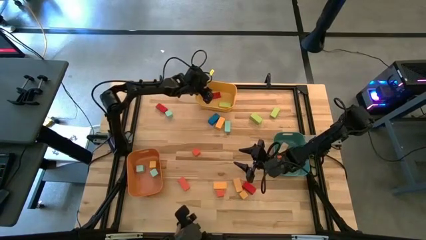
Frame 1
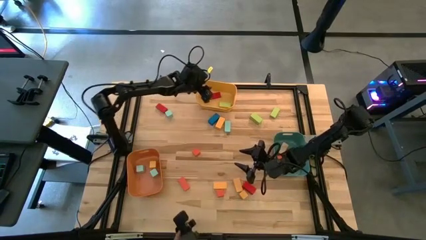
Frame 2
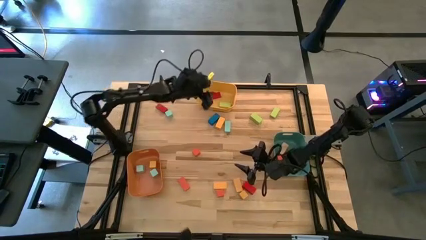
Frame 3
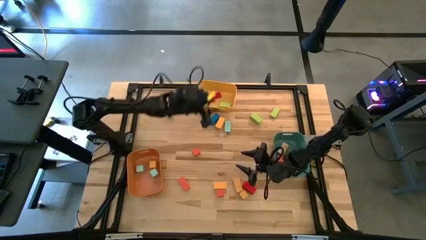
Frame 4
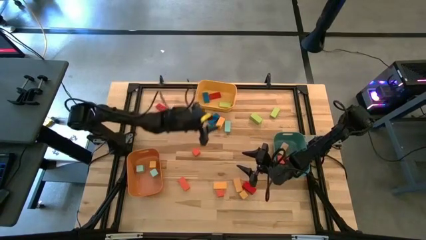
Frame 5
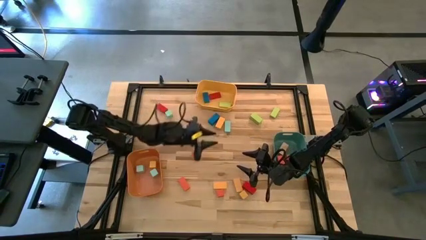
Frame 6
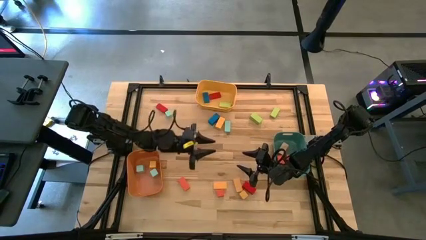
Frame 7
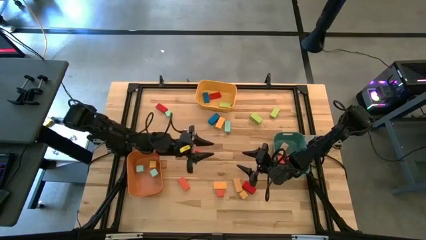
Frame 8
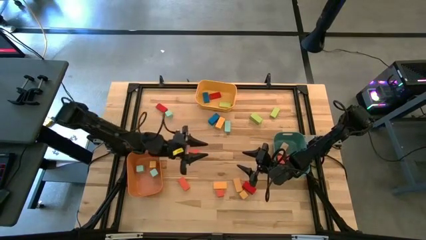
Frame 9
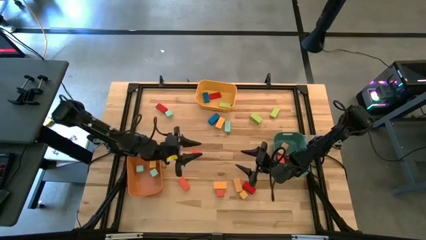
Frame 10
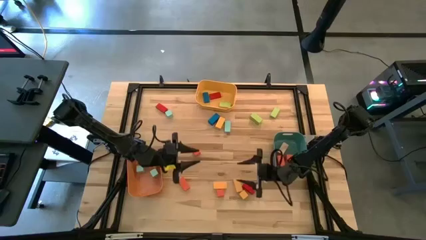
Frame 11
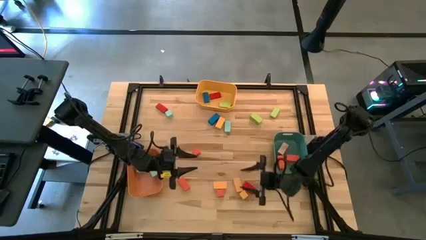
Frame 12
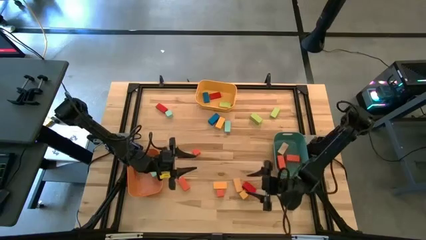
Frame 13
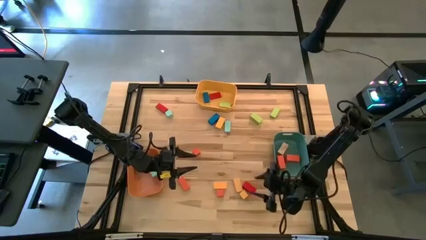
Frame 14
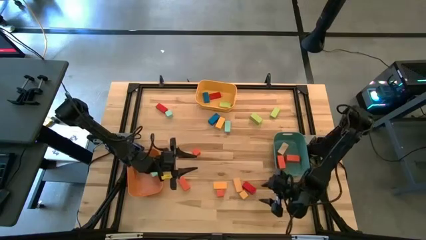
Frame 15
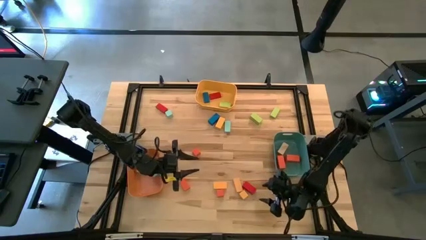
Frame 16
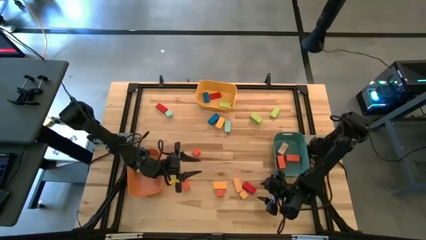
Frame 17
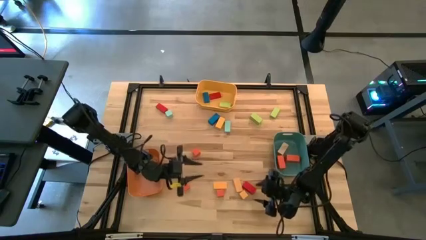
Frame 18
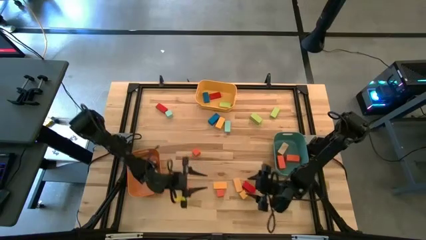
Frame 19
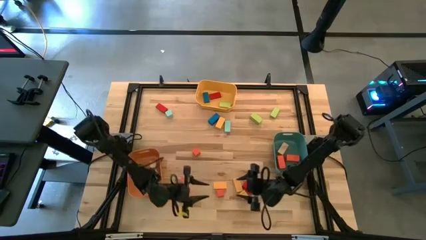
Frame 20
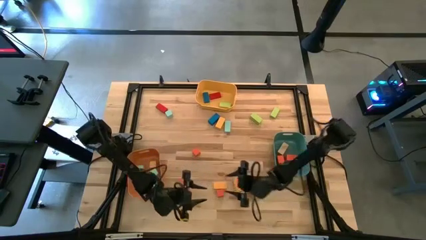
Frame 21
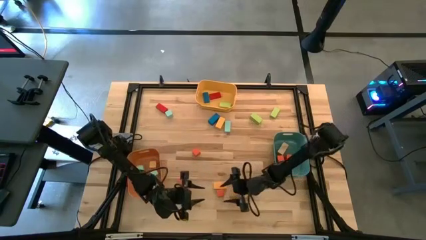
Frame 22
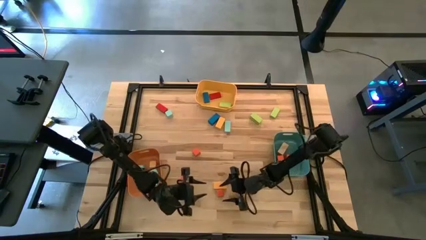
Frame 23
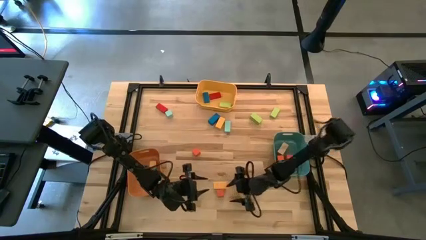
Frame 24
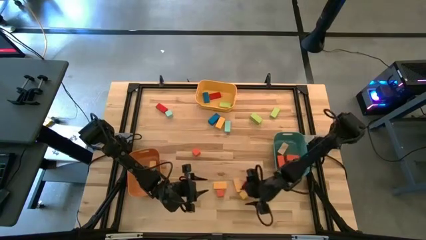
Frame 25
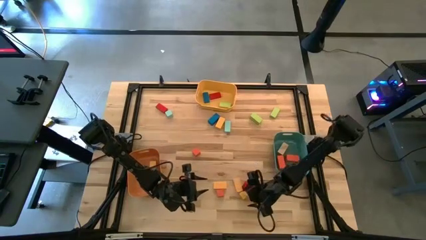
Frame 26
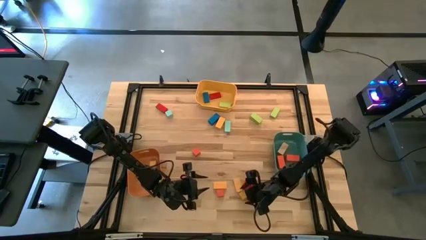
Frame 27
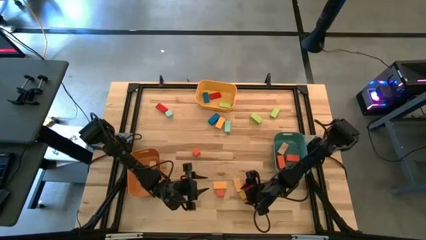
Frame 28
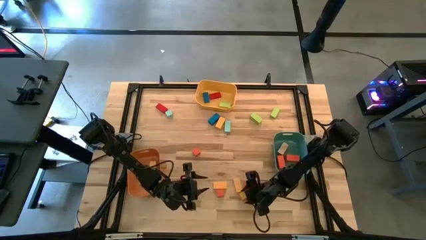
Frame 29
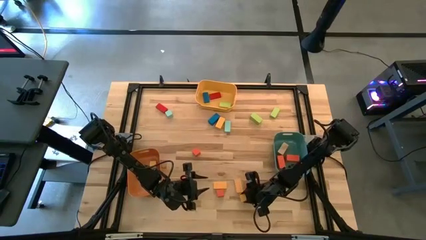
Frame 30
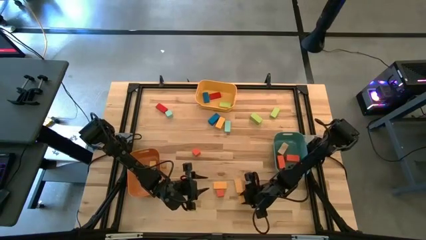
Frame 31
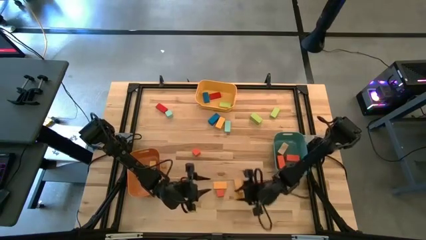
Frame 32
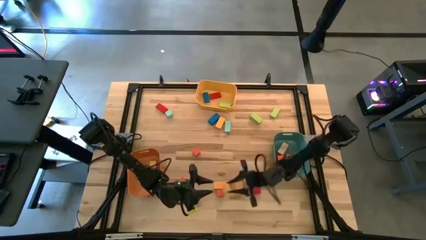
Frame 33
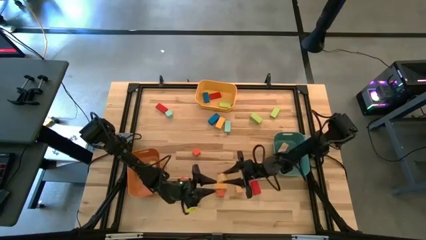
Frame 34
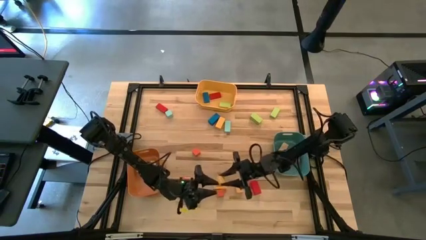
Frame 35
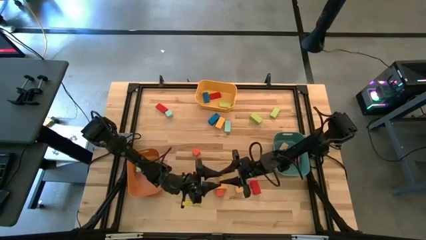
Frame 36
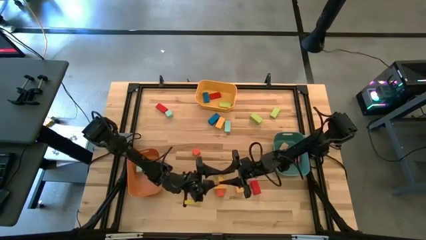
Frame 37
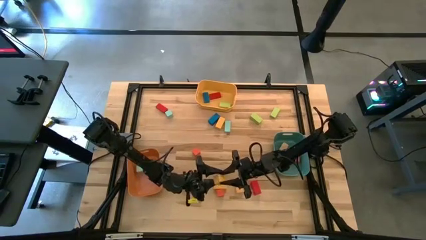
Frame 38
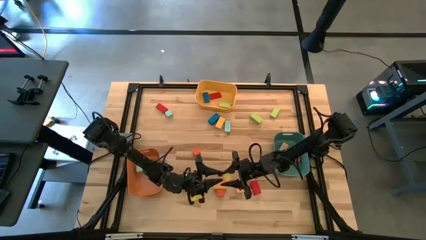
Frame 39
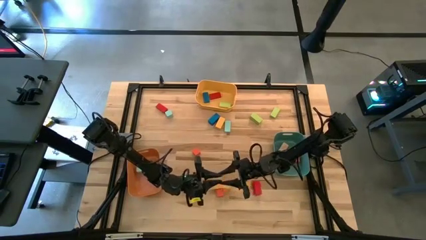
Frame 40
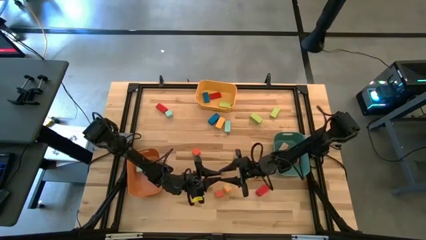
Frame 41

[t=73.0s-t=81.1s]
Task: Sort blocks by size
Put the yellow square block into the orange bin

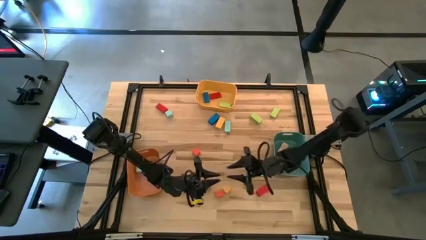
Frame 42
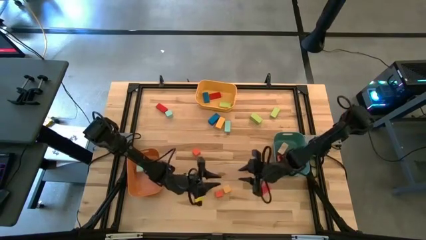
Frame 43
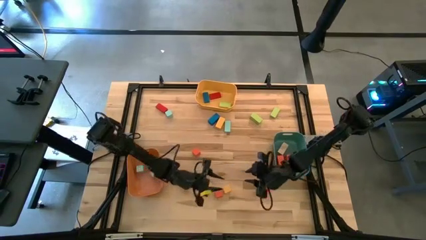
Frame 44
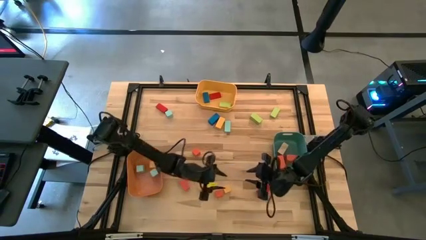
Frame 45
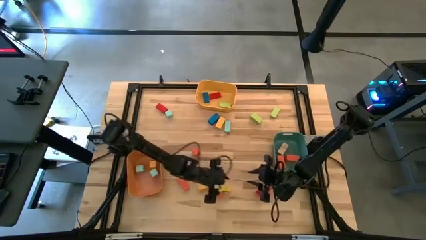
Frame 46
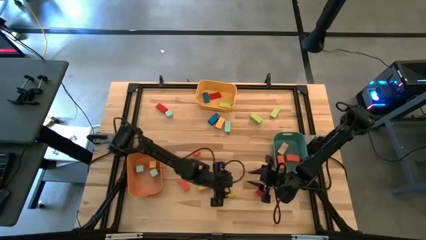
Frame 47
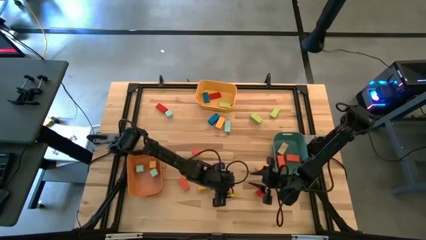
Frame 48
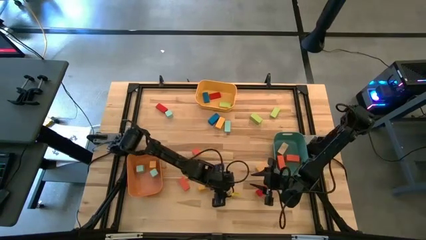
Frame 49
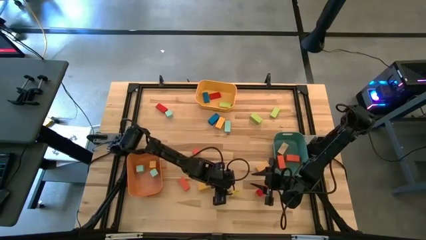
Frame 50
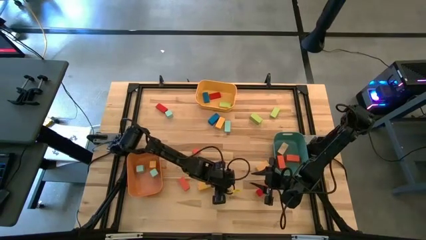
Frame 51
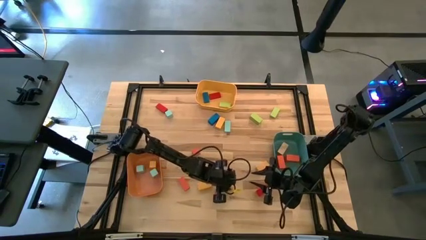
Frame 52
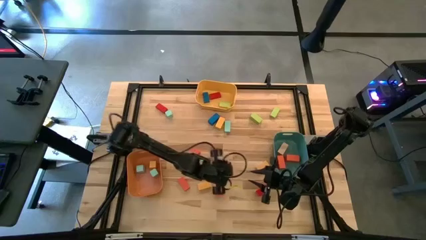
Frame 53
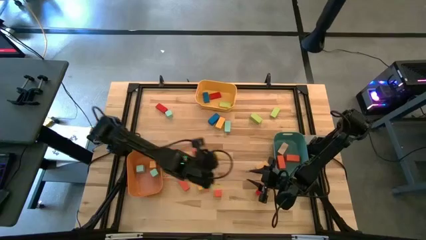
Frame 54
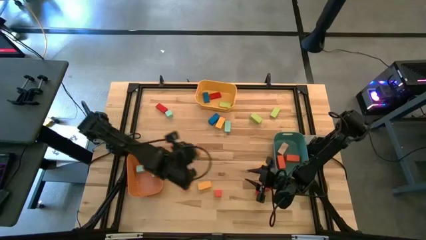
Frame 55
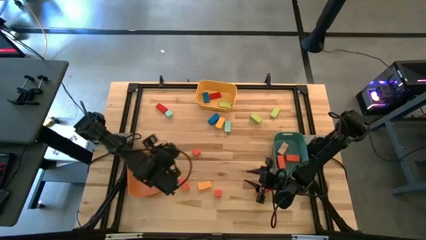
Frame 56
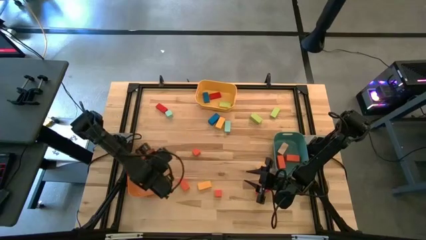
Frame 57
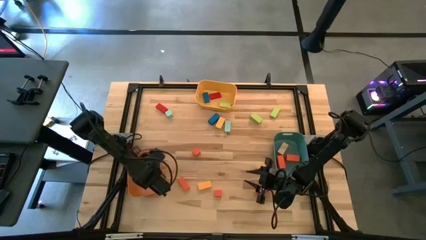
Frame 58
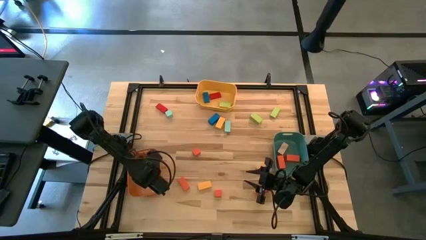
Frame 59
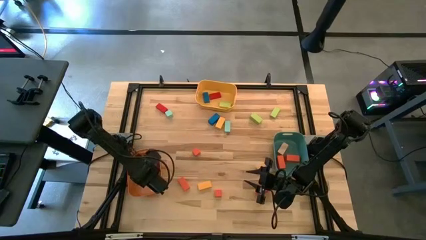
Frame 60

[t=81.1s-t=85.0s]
Put the yellow square block into the orange bin

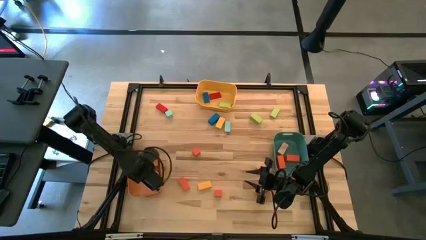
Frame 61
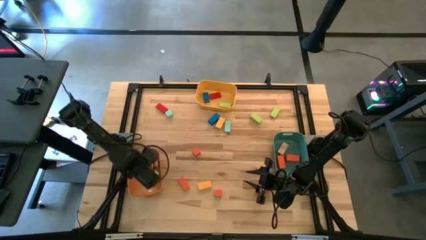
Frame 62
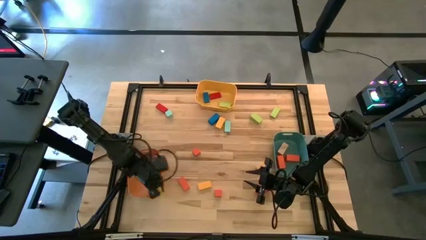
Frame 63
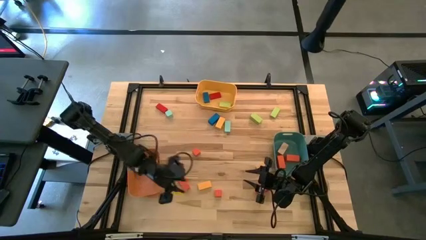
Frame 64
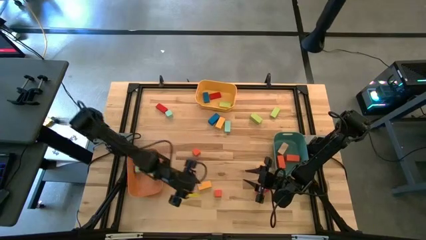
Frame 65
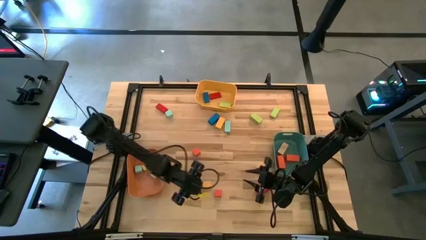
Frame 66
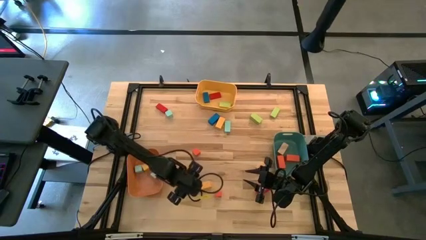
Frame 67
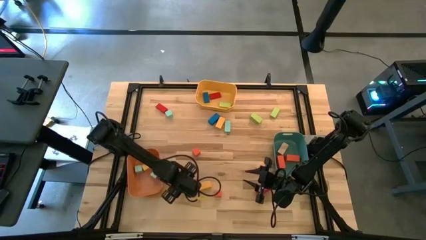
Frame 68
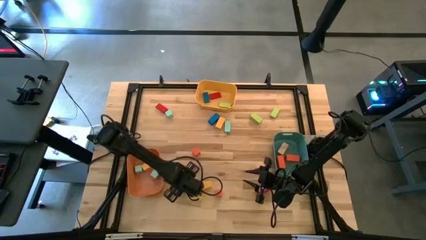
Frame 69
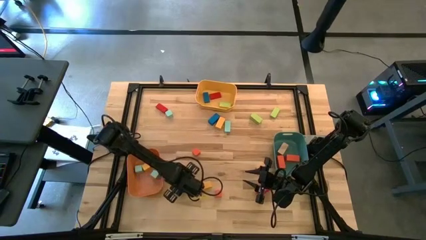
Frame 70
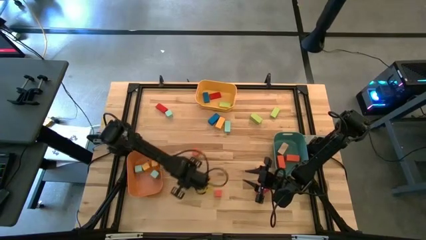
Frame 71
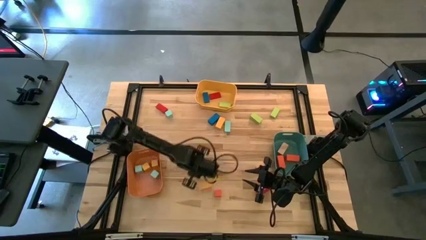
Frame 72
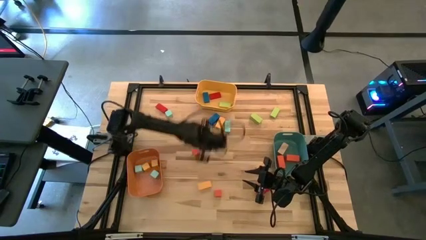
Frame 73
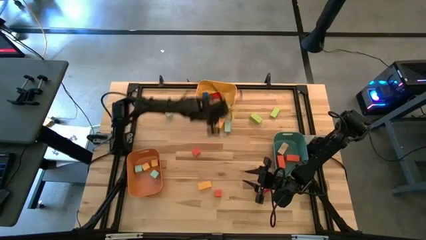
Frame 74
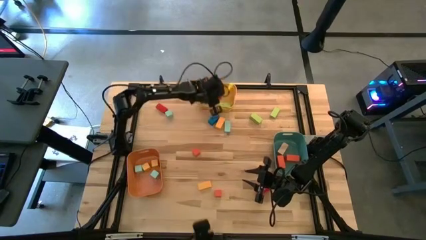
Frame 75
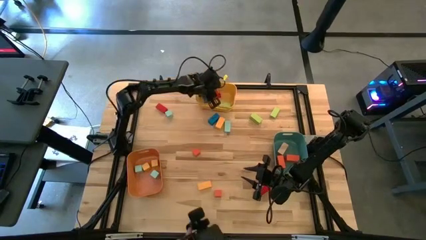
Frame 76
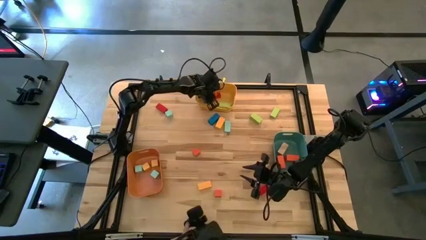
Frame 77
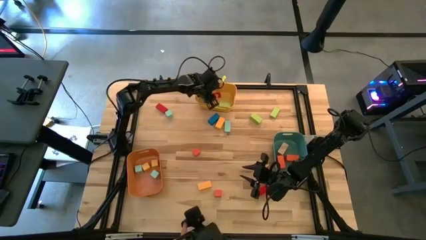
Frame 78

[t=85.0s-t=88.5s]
Put the thin orange rectangular block into the yellow bin
